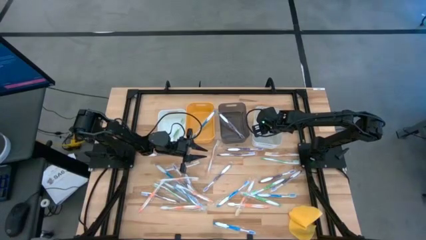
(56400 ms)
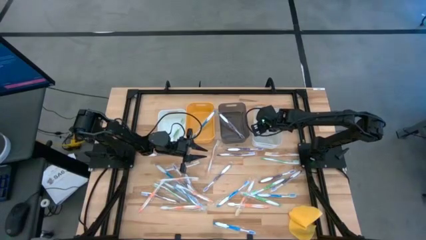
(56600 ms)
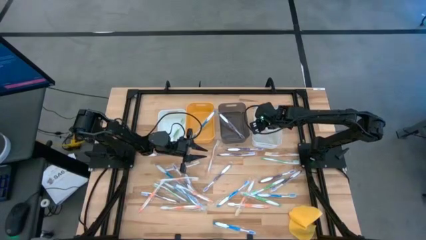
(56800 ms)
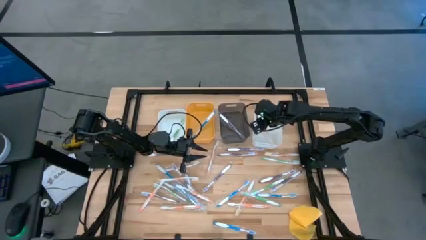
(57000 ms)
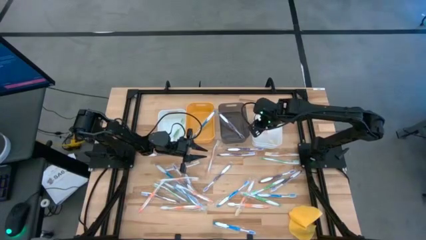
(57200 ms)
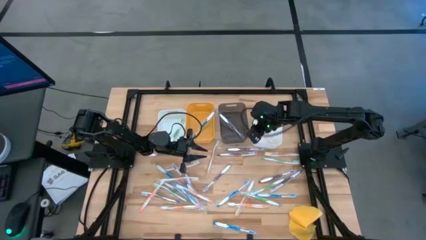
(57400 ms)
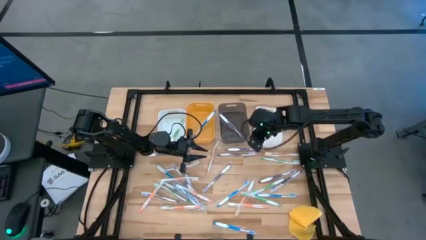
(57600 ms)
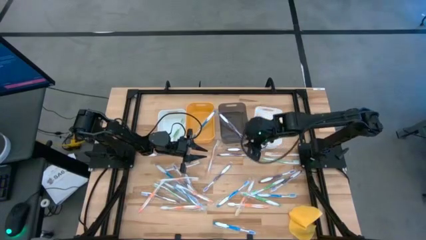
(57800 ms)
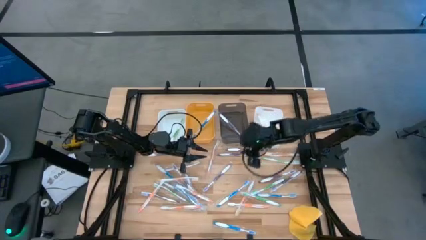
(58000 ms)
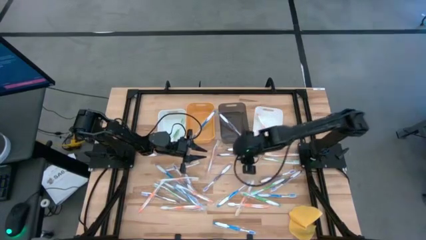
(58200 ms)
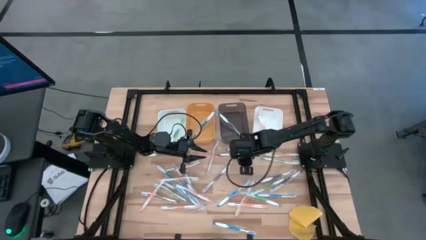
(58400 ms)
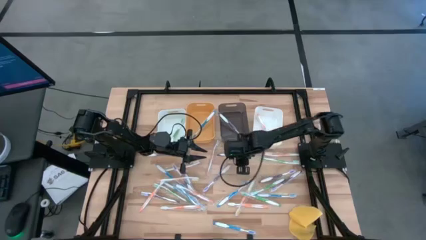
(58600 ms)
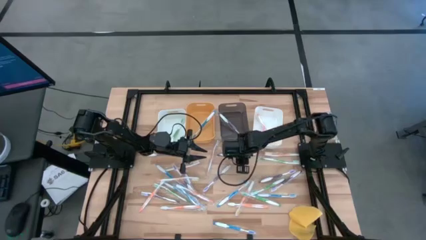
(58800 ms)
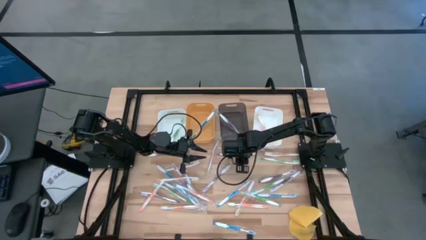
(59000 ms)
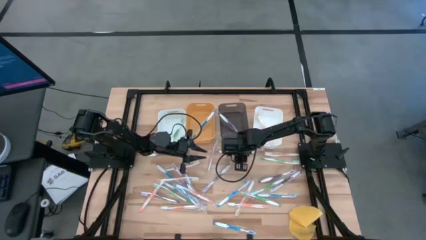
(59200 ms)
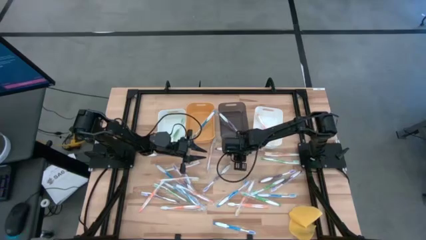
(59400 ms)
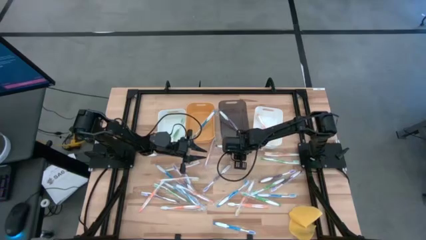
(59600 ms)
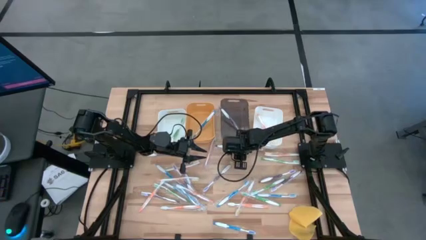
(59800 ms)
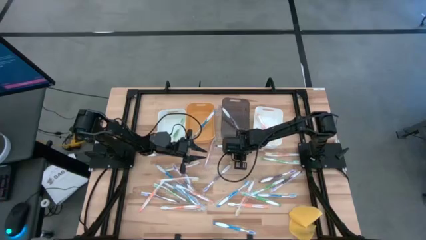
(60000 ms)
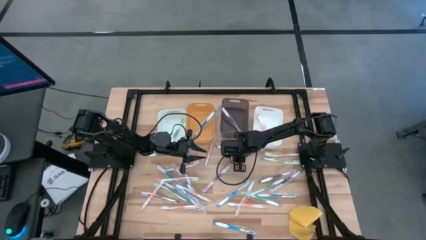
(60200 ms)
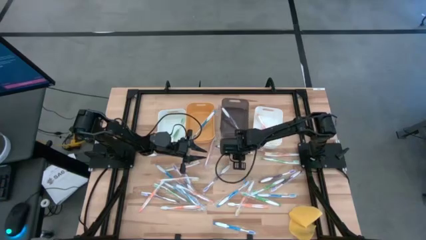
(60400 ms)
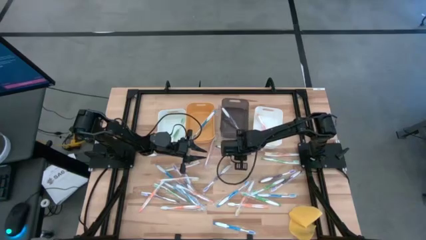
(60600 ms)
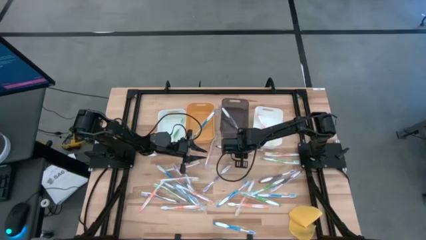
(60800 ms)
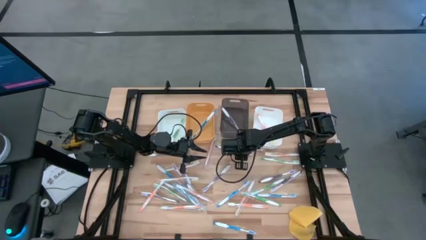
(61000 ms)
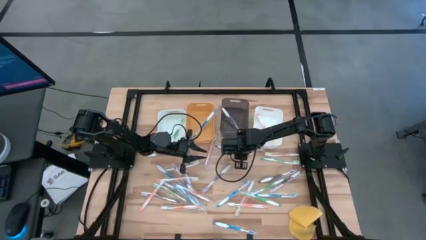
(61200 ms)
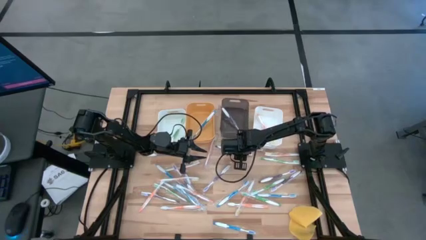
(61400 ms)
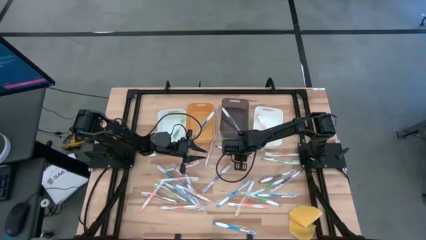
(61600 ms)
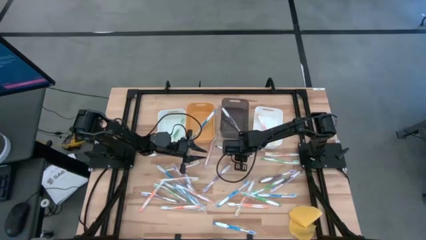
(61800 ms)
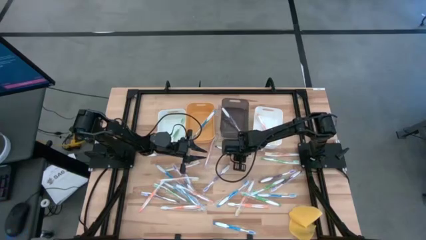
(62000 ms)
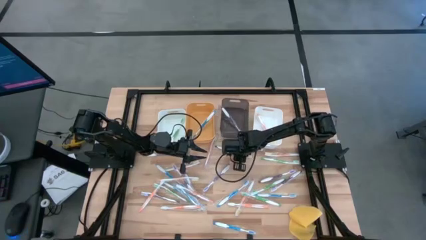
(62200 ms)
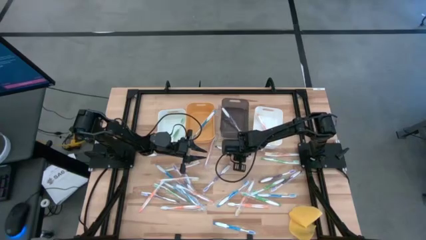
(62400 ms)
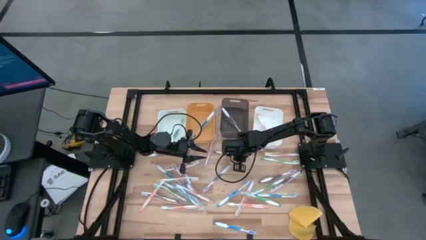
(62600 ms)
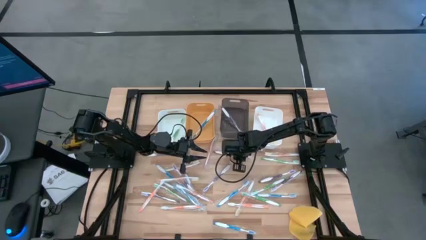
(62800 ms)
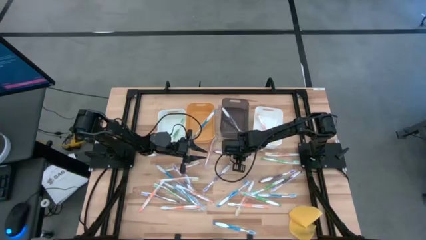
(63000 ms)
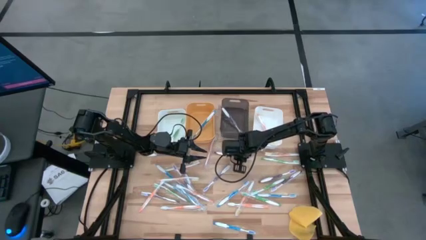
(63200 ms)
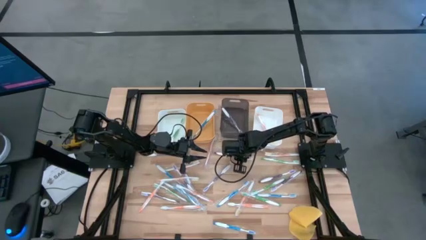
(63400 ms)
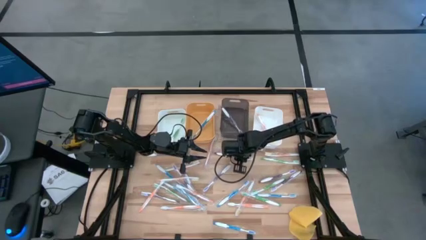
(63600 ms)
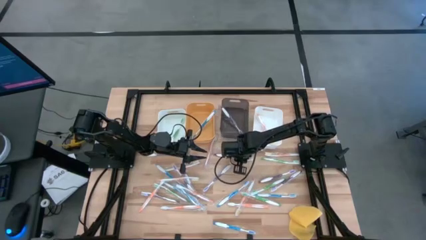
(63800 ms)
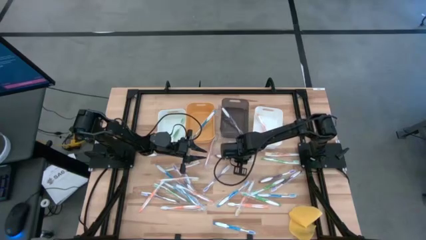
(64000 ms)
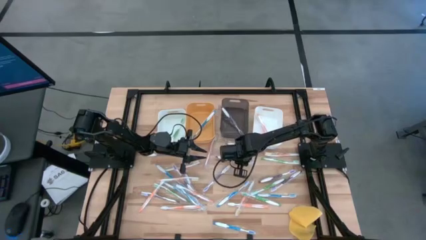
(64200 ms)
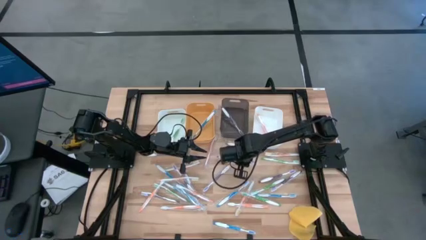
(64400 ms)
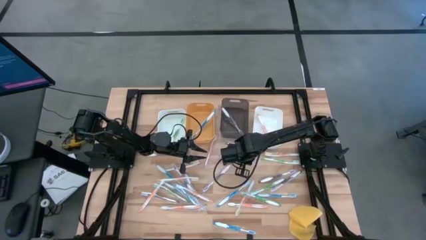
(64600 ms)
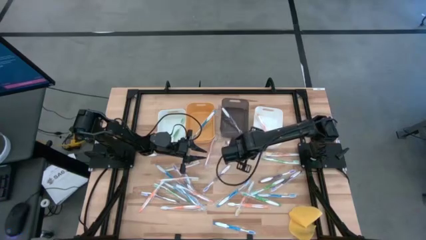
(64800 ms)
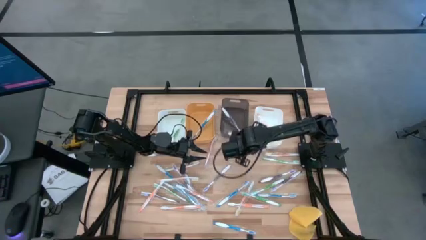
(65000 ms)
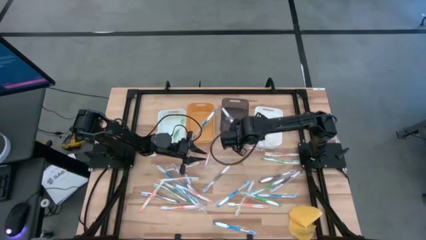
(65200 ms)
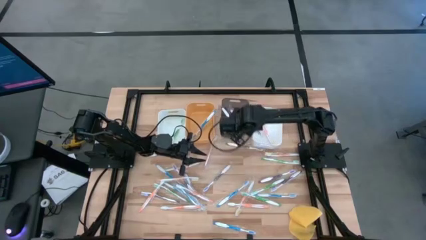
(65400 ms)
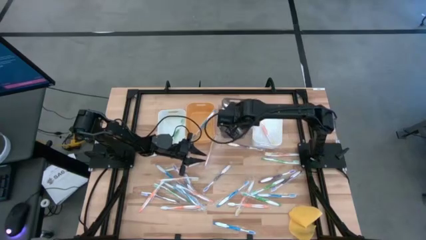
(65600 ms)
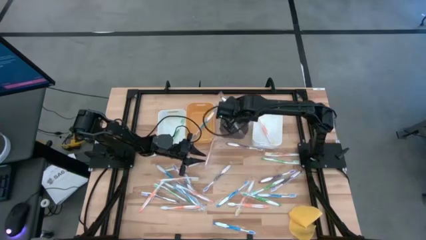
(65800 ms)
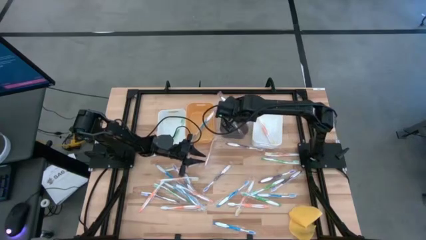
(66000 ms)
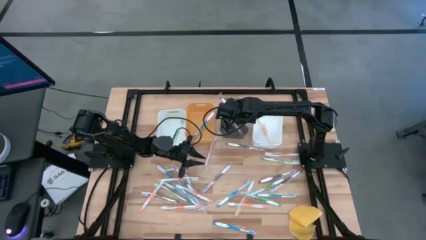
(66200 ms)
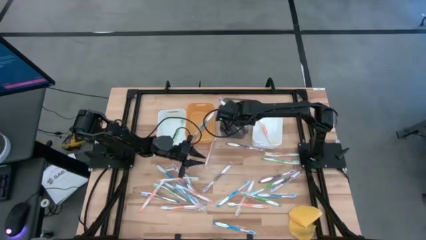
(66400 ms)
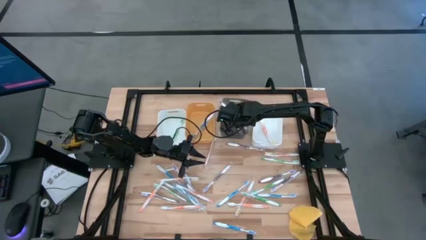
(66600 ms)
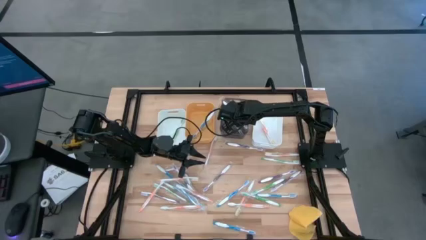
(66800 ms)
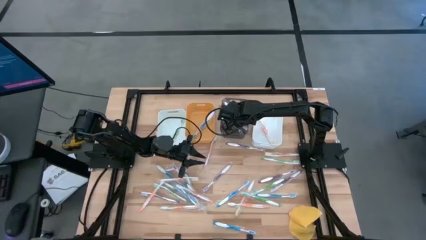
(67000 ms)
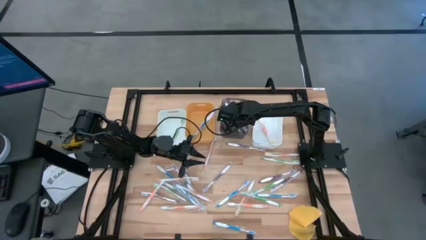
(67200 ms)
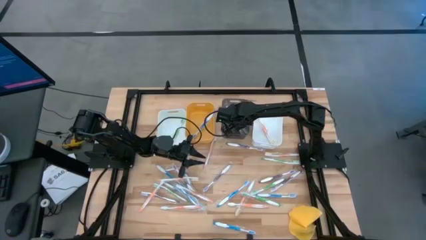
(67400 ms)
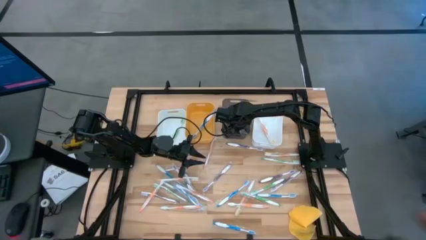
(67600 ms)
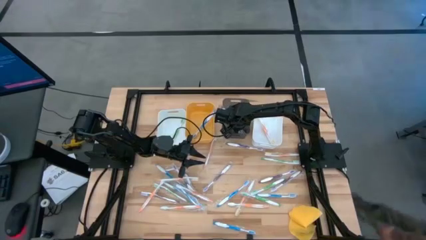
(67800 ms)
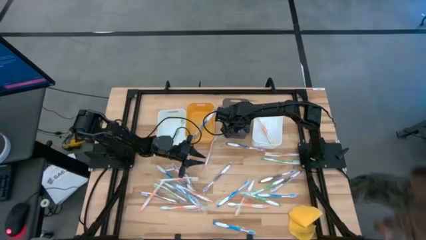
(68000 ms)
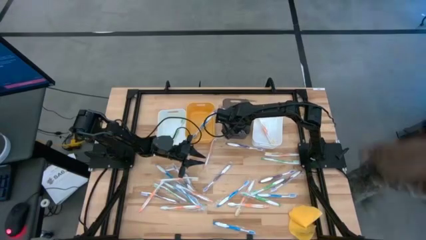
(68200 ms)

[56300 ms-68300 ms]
Task: Pick & Place Toothbrushes
Put the purple toothbrush into the black transparent bin

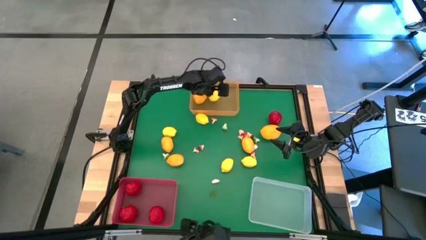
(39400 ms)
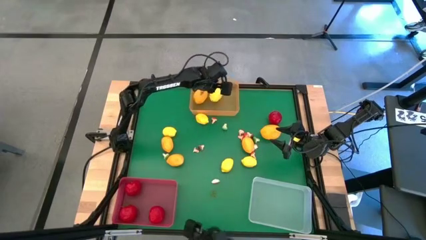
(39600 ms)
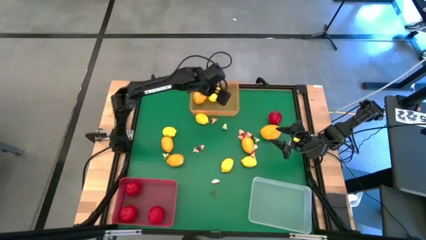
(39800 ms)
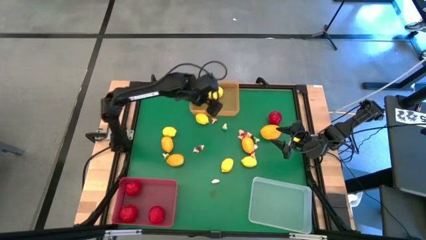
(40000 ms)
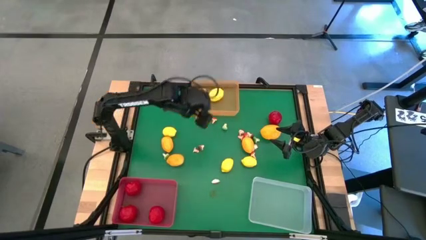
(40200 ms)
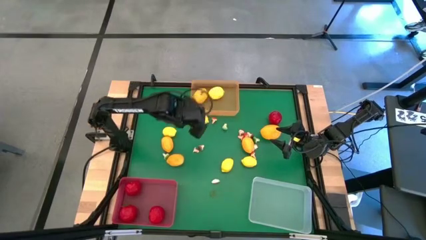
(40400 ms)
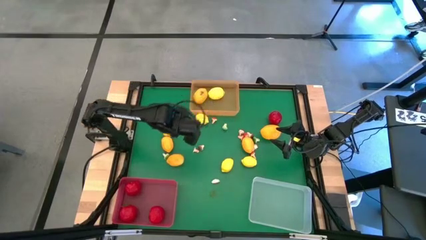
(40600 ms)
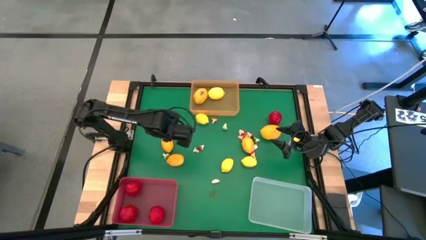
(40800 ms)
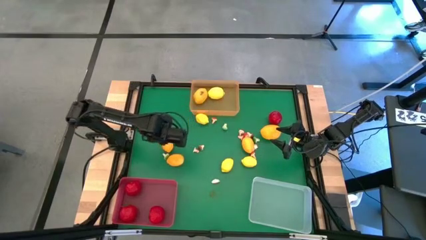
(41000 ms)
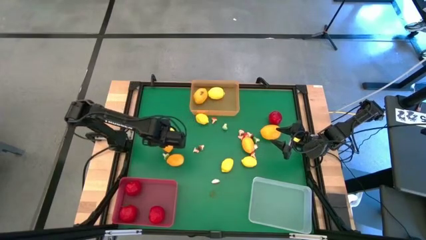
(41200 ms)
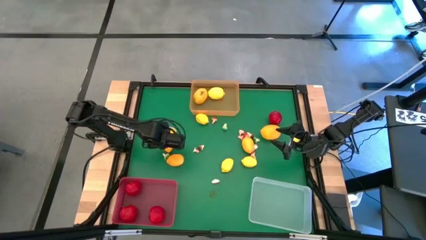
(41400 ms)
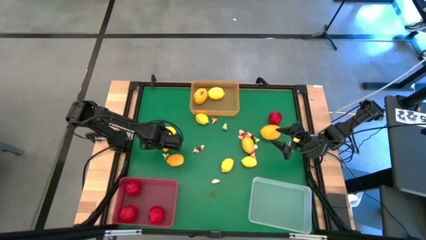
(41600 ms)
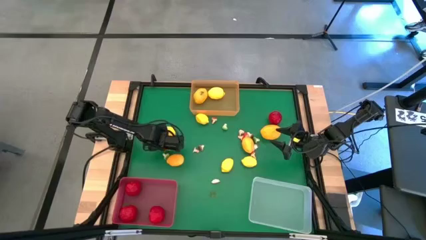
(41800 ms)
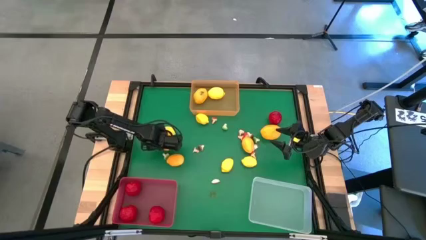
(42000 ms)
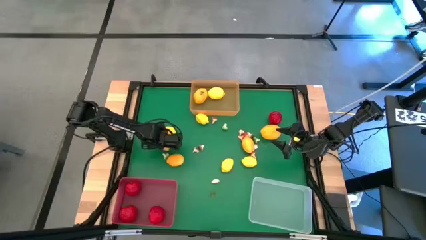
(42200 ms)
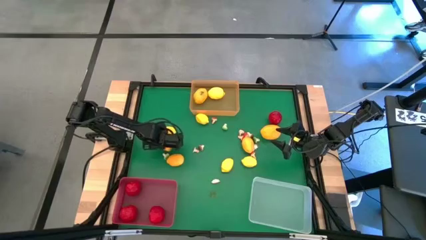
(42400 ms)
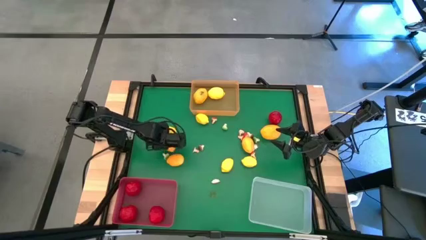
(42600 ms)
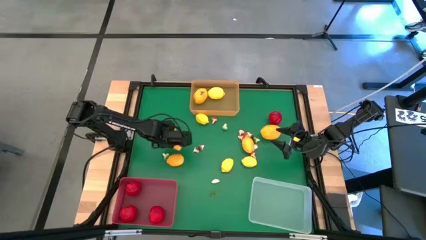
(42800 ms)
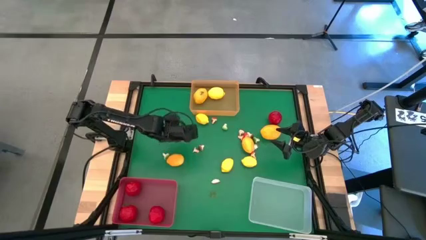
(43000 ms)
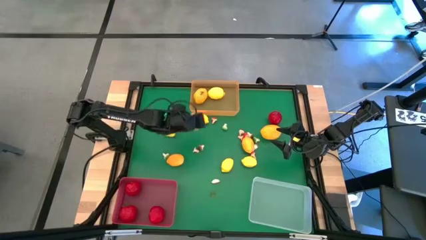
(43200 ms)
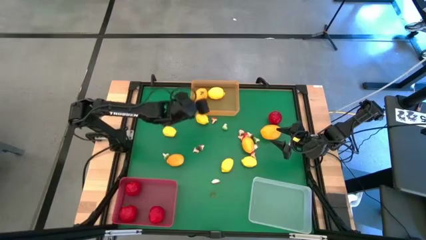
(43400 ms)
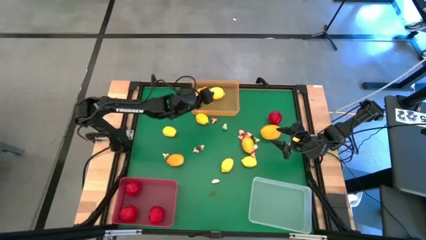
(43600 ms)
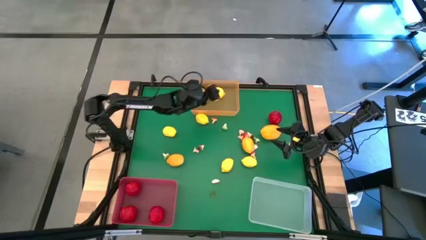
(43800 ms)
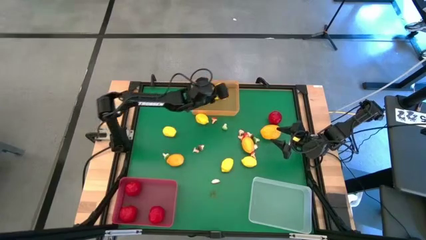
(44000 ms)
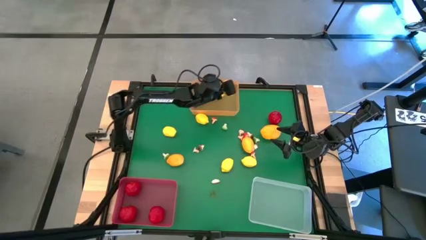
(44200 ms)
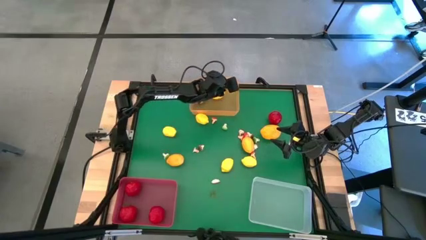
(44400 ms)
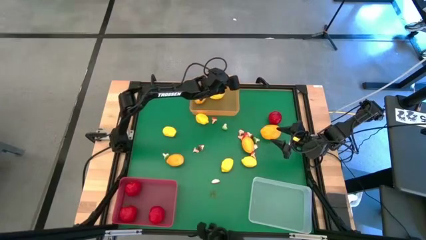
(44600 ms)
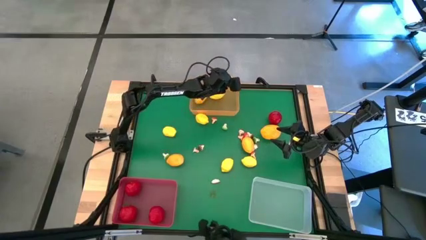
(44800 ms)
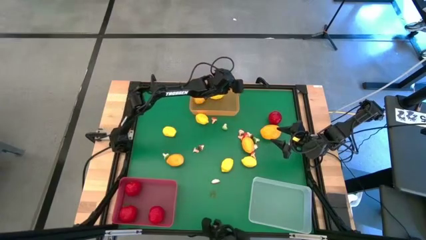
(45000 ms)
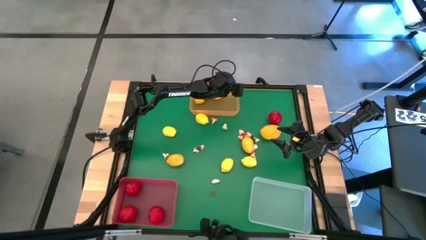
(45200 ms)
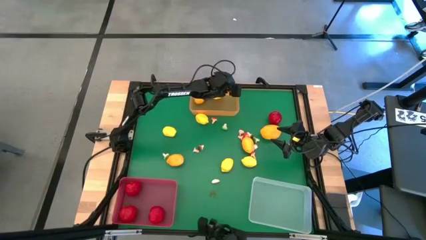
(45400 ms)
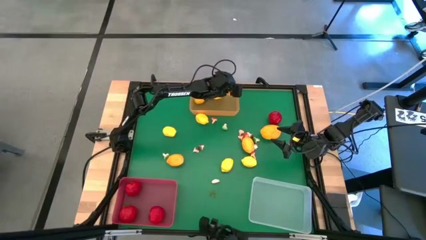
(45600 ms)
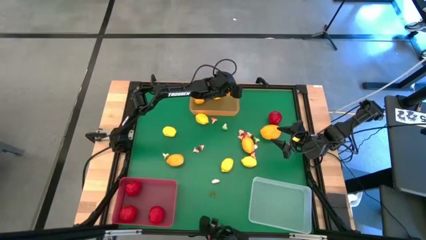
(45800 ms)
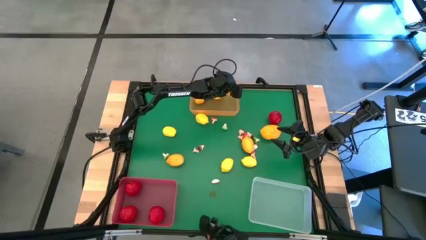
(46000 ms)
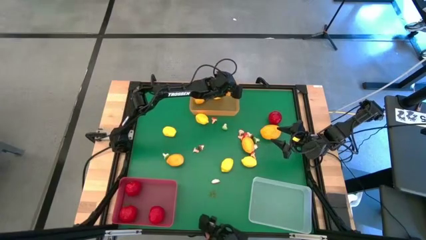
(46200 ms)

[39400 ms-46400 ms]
Task: Sort produce into baskets
Put the mango into the orange bin
